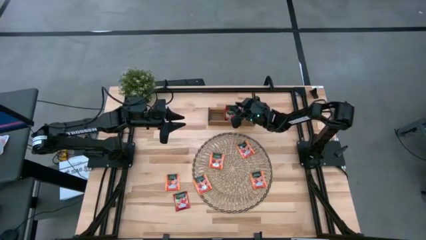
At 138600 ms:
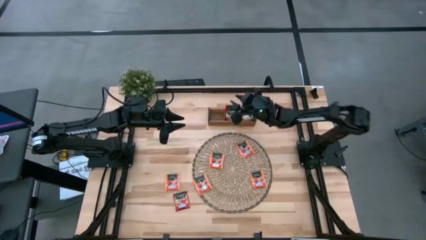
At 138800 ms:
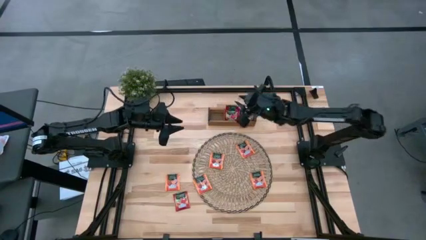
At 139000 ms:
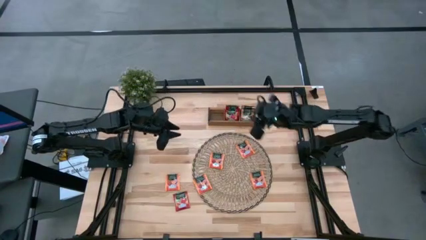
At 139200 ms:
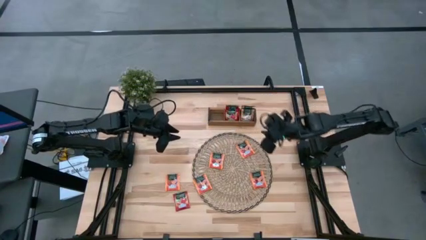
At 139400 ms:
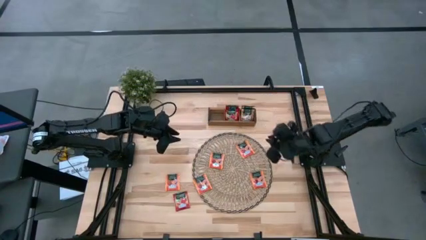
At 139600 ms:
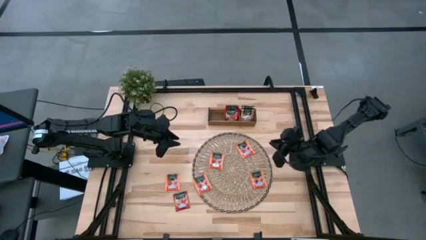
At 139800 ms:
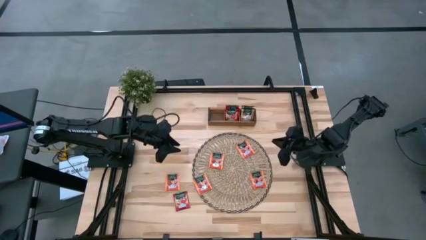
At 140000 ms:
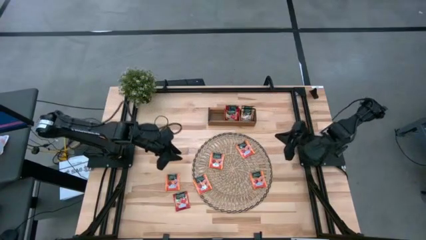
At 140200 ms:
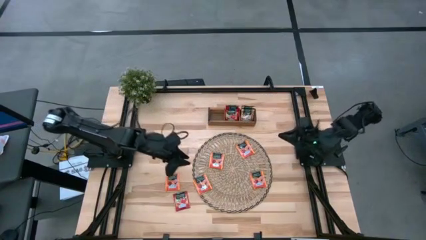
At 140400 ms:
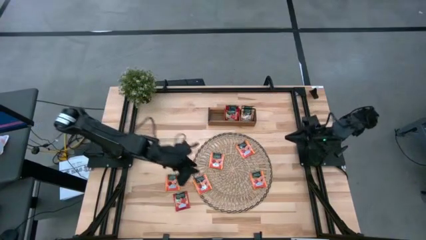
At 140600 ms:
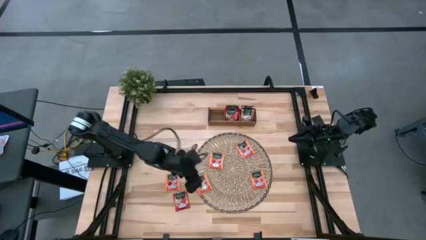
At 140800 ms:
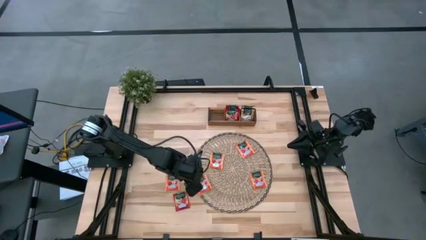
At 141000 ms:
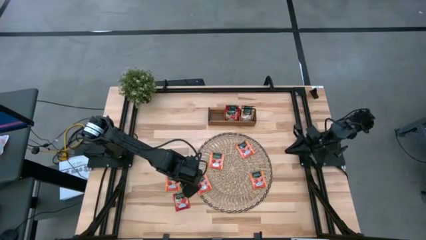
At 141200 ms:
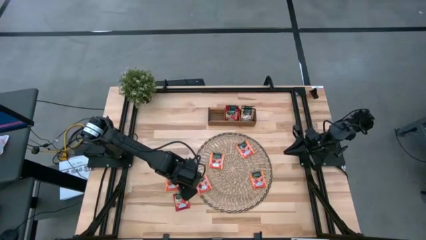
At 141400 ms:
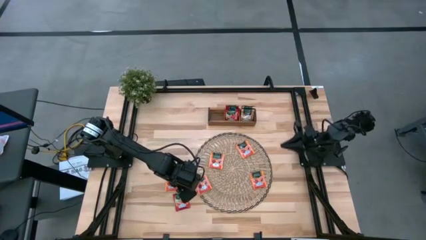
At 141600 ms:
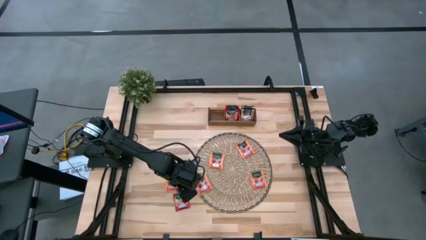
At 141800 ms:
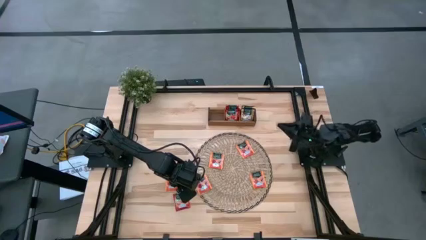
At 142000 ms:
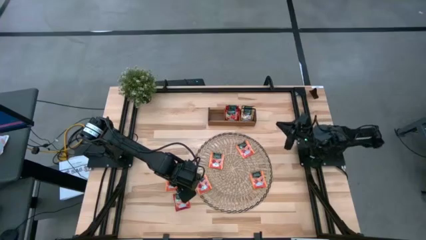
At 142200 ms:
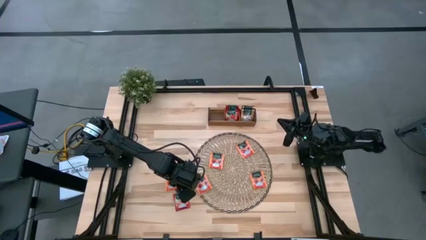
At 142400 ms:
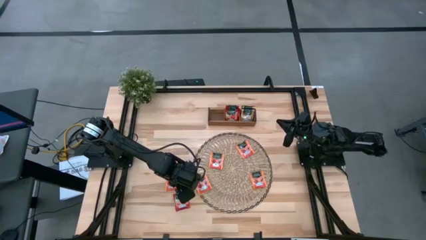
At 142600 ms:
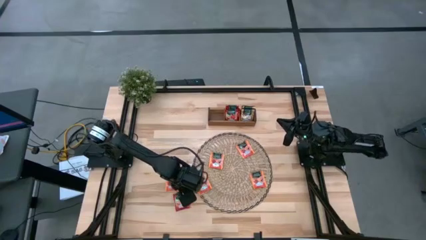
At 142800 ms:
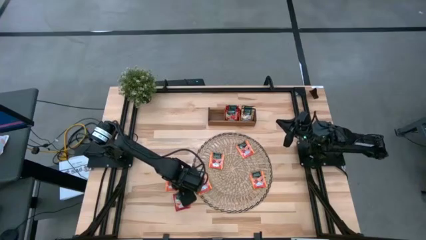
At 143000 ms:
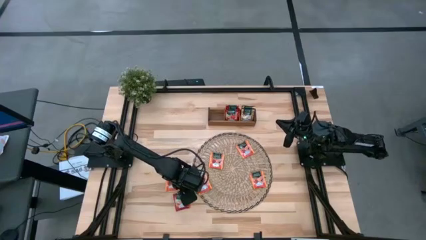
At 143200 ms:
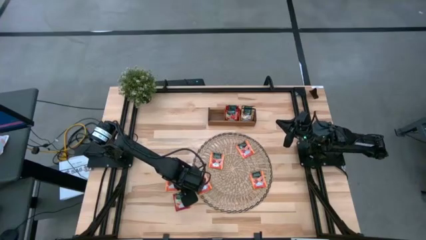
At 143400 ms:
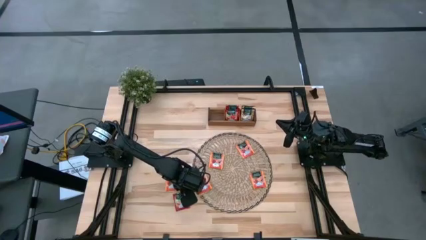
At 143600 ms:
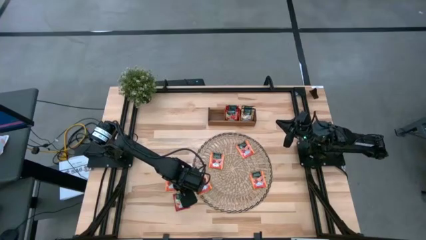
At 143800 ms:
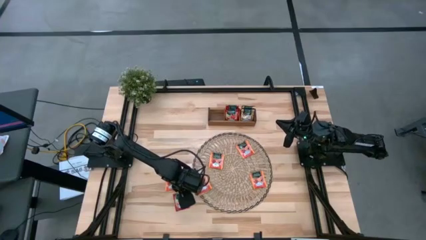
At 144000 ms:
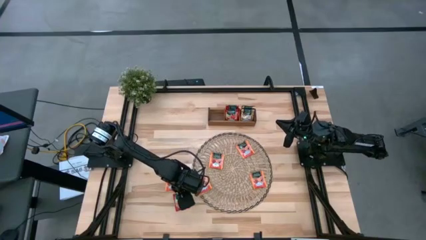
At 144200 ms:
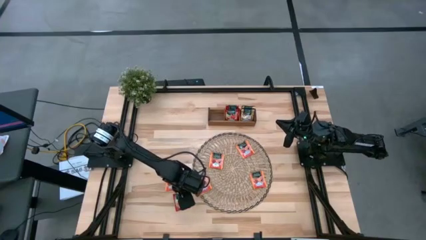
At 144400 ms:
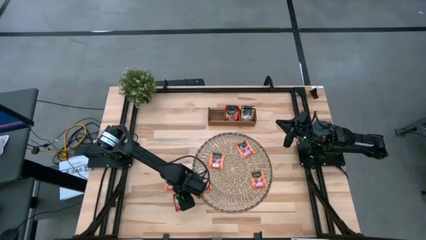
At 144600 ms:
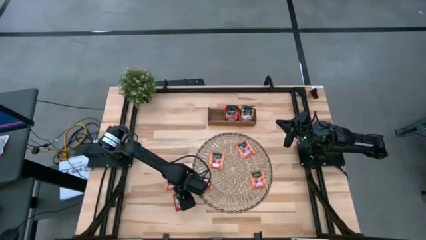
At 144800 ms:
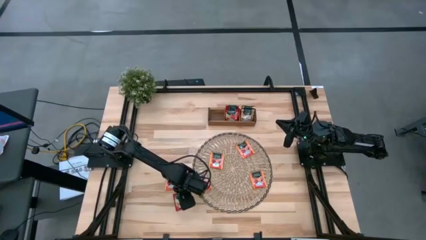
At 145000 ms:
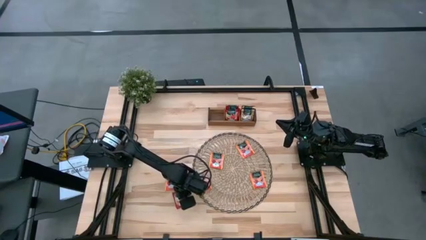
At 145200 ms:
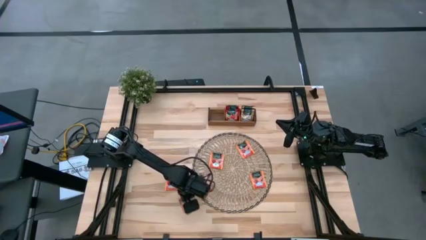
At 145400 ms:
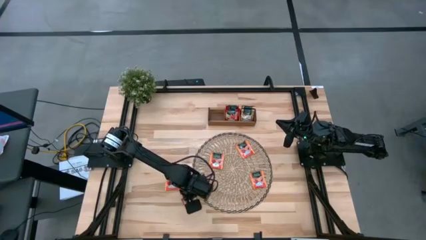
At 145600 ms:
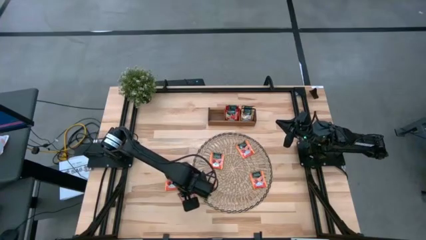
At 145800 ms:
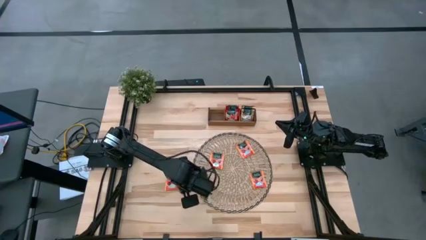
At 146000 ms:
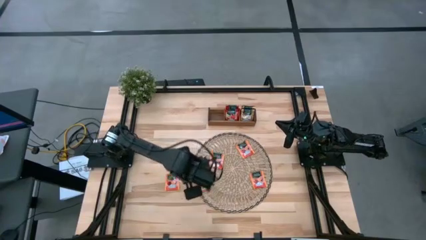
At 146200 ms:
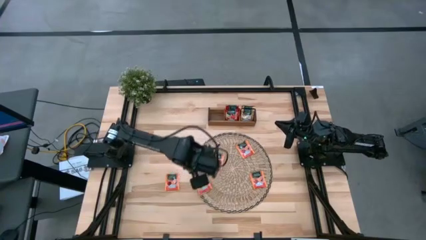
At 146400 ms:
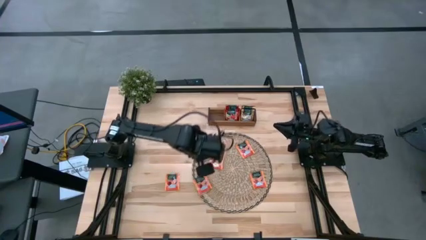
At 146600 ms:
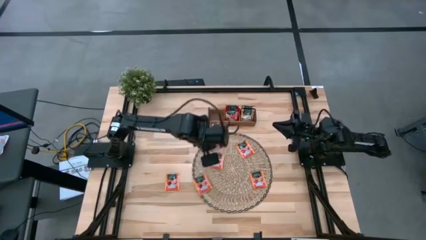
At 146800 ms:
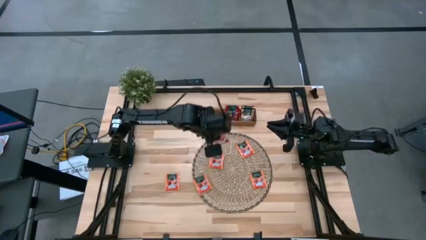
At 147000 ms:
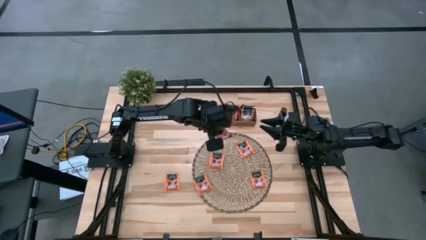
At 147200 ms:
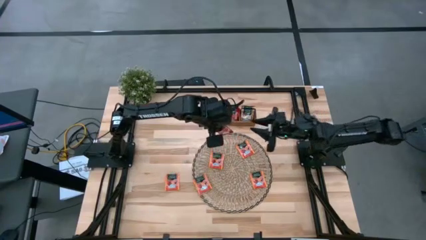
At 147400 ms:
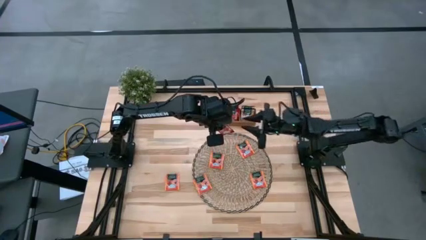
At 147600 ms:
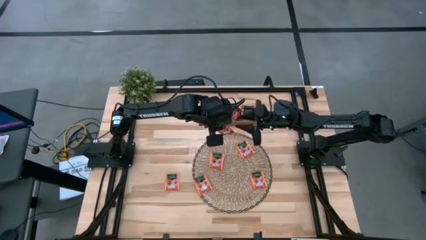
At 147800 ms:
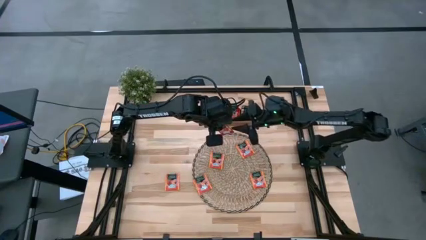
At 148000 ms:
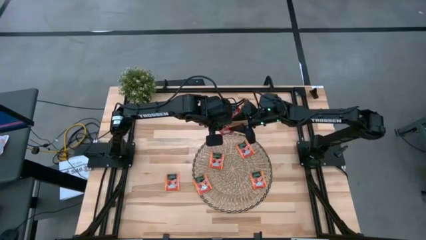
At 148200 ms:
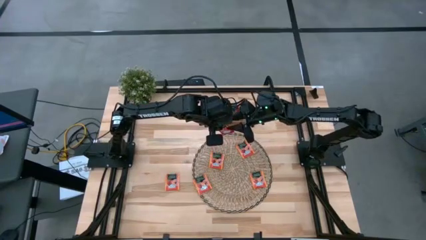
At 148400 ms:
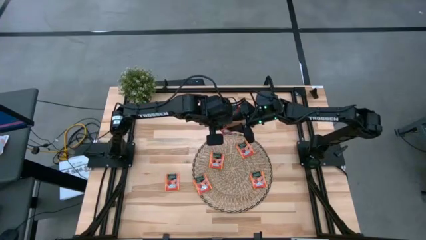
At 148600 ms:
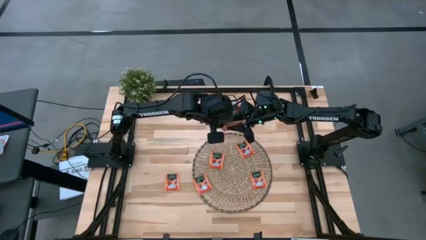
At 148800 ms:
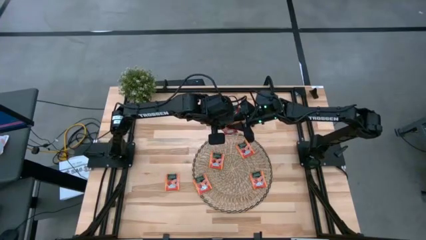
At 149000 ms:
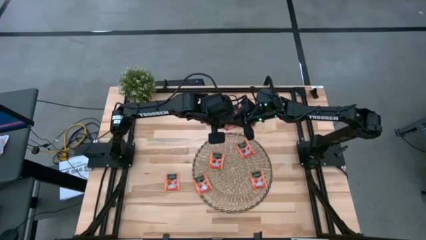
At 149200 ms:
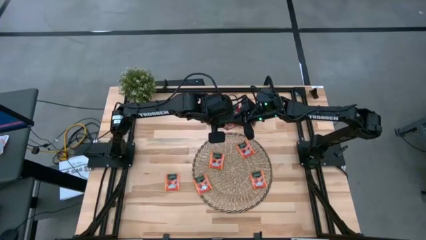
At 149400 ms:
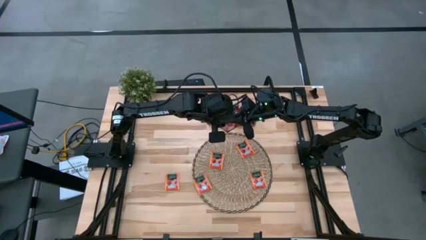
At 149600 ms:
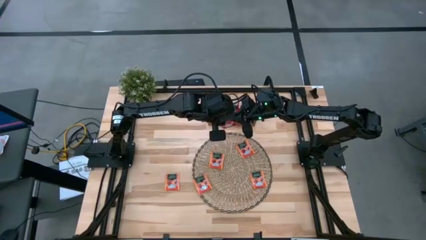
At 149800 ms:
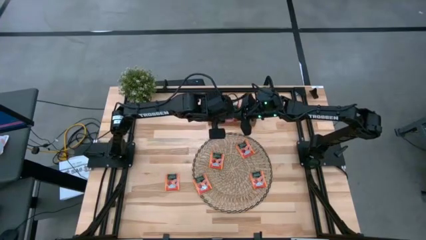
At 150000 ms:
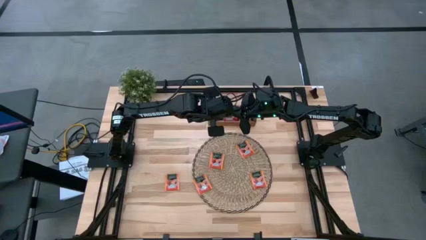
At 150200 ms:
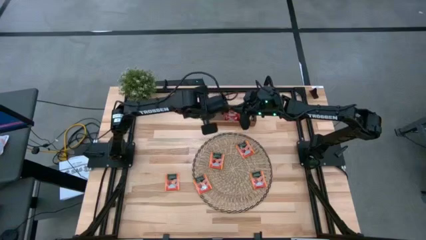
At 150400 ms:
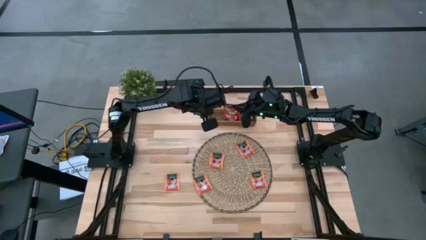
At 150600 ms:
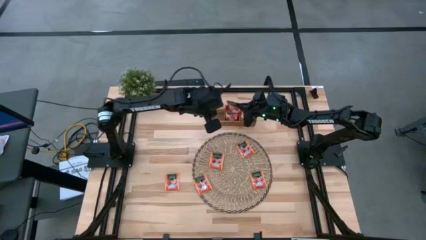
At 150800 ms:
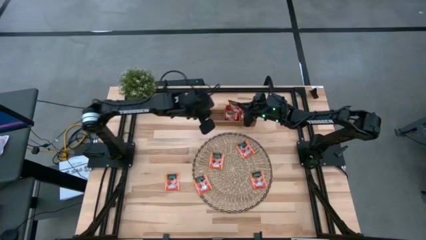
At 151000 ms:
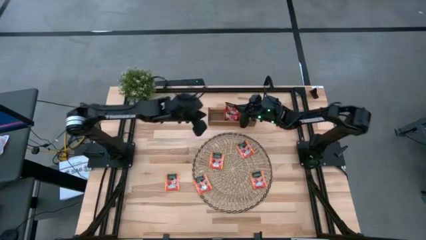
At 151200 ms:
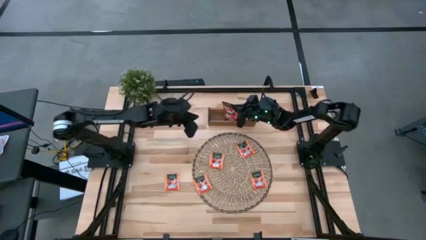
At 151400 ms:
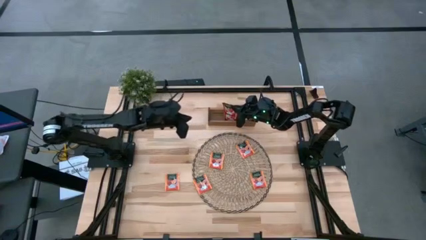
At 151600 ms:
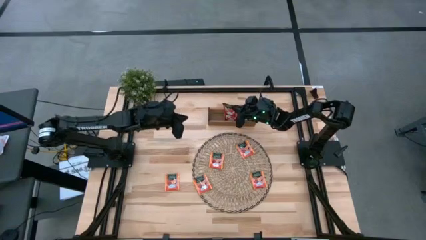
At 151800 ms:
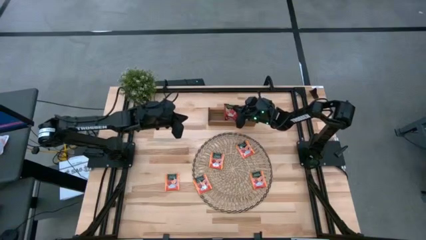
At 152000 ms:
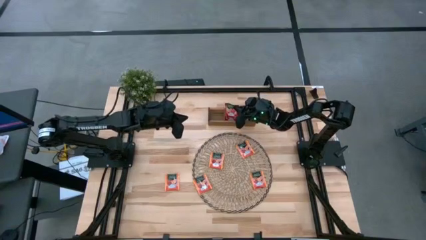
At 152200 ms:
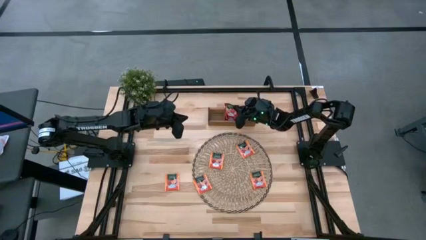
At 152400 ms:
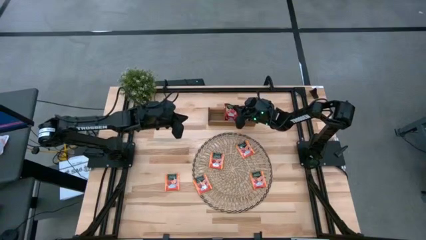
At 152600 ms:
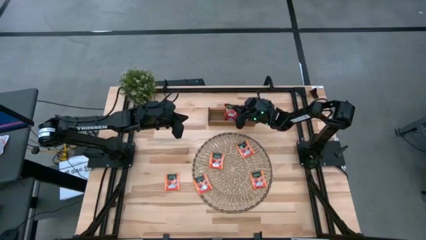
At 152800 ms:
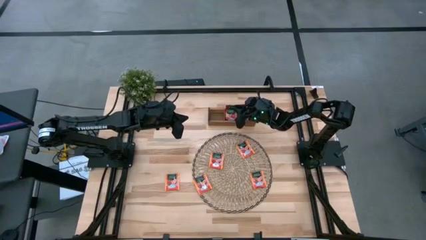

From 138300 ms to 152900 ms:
Task: Pick & Place Tea
Put the red tea bag into the middle section of the wooden organizer
